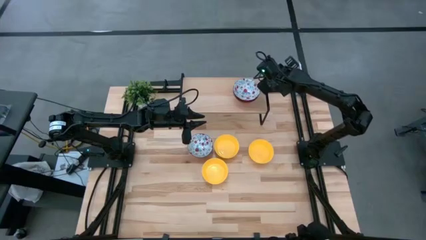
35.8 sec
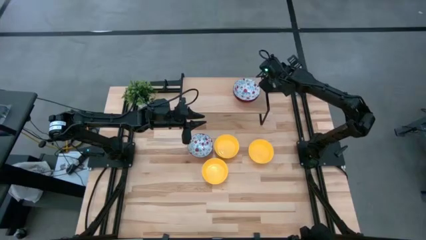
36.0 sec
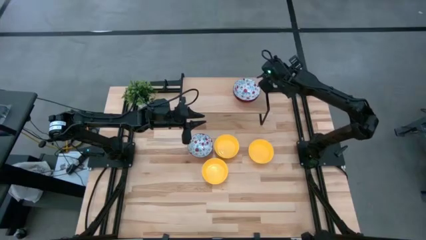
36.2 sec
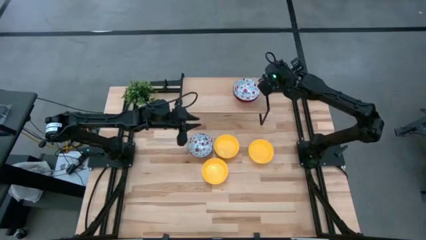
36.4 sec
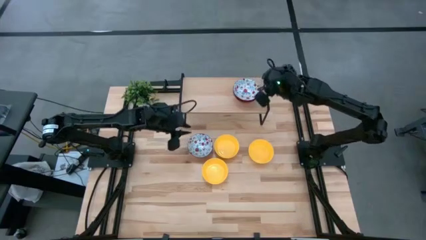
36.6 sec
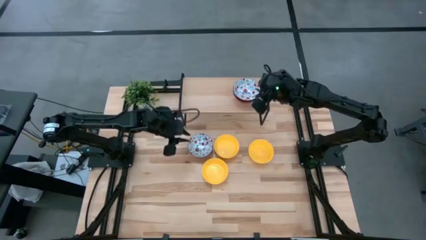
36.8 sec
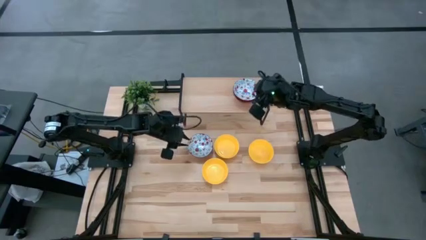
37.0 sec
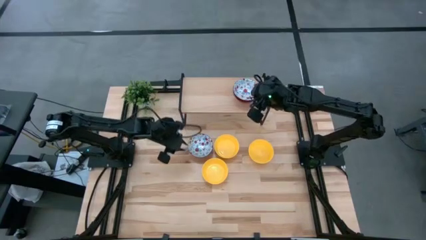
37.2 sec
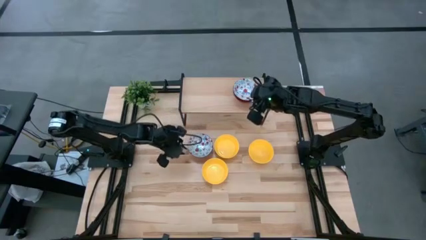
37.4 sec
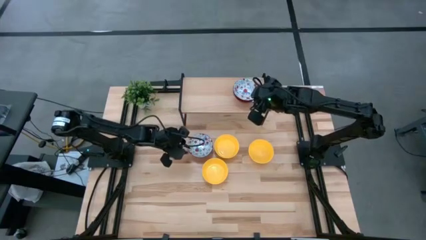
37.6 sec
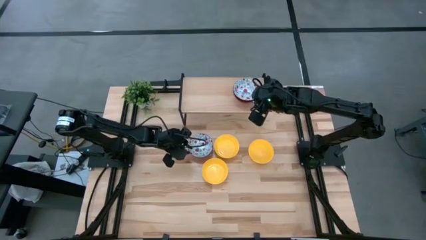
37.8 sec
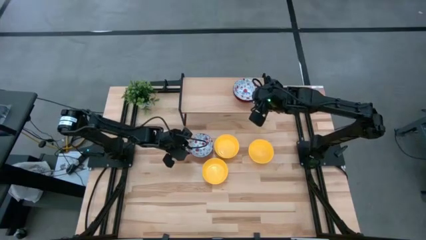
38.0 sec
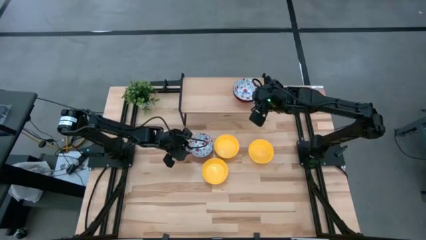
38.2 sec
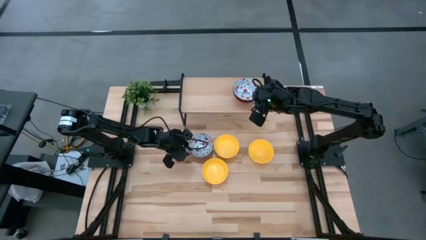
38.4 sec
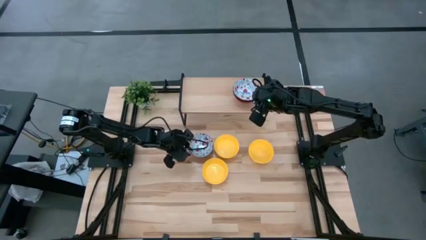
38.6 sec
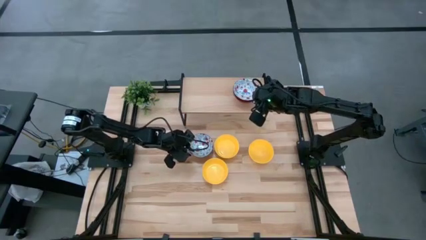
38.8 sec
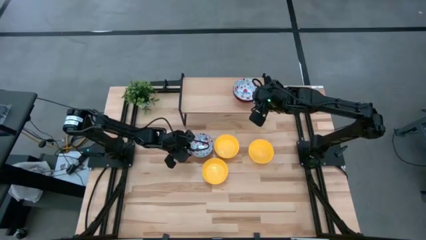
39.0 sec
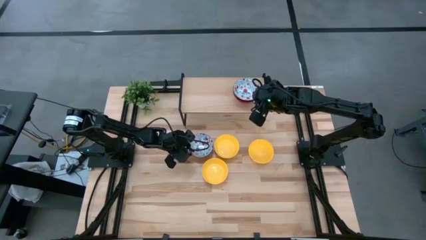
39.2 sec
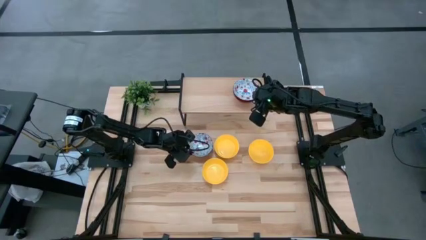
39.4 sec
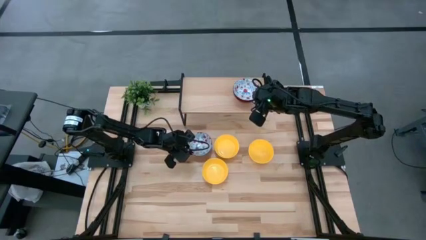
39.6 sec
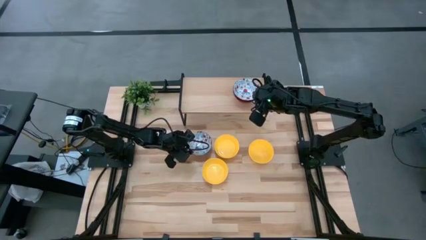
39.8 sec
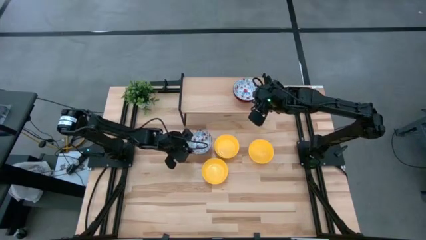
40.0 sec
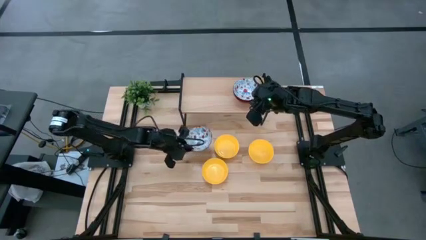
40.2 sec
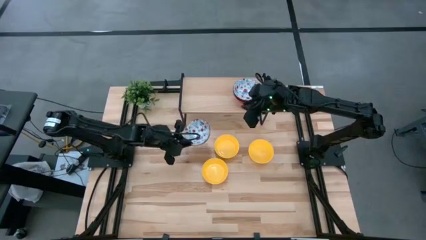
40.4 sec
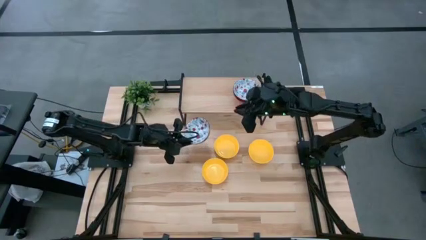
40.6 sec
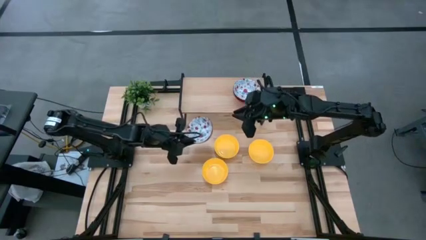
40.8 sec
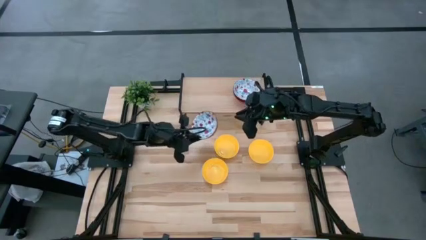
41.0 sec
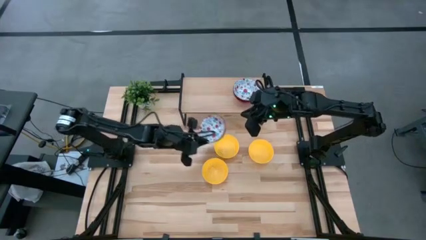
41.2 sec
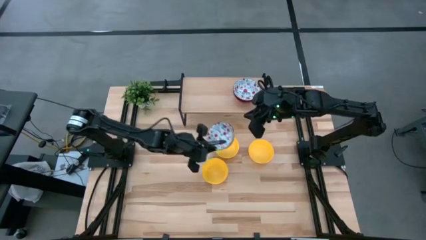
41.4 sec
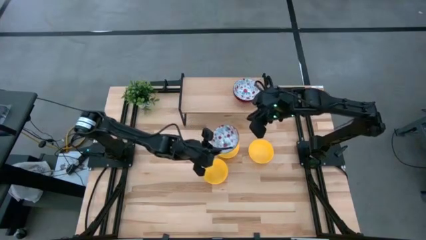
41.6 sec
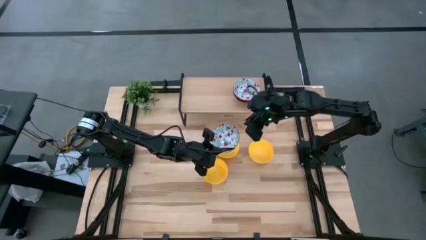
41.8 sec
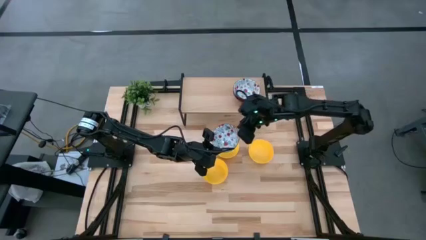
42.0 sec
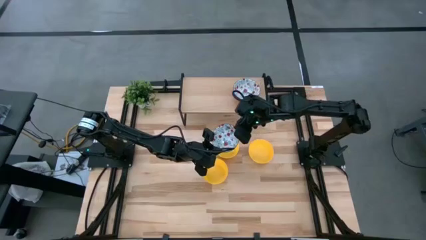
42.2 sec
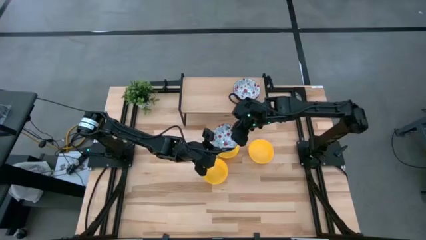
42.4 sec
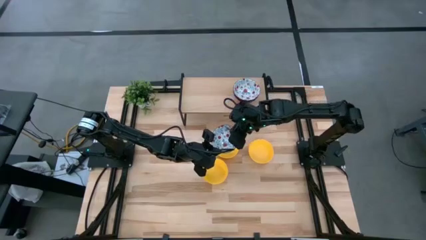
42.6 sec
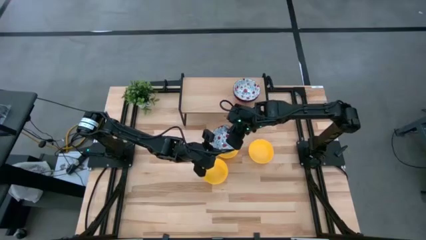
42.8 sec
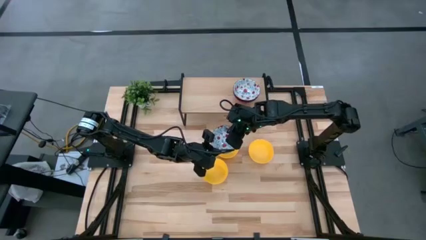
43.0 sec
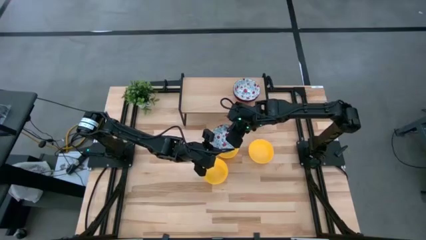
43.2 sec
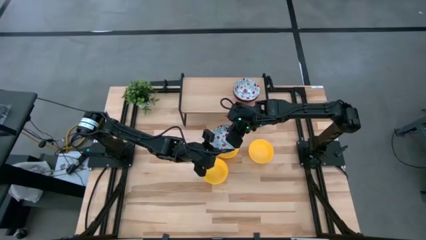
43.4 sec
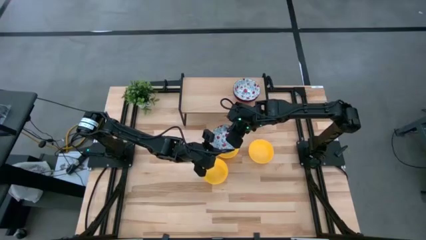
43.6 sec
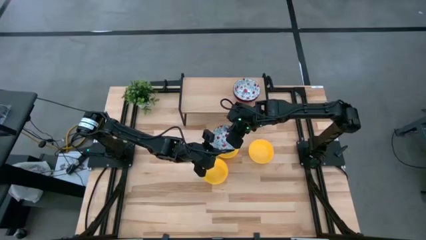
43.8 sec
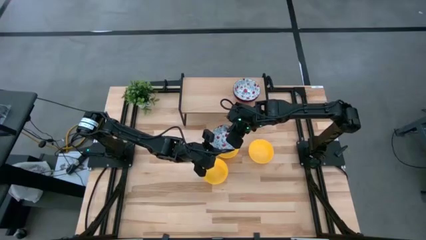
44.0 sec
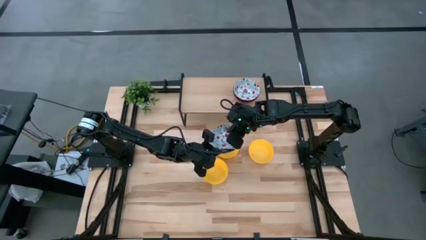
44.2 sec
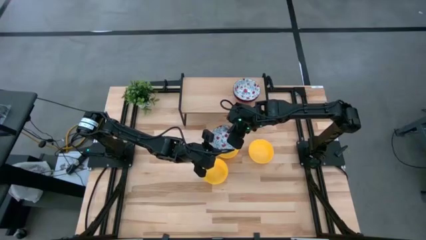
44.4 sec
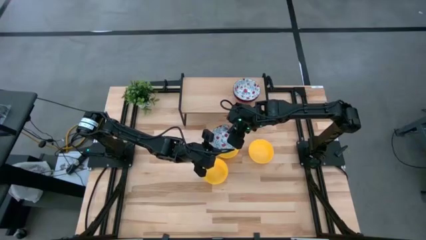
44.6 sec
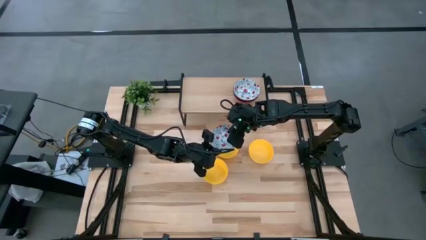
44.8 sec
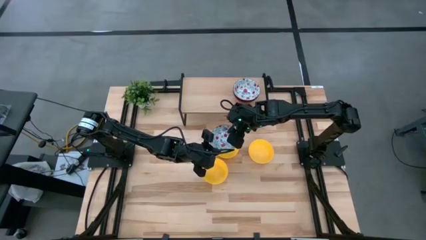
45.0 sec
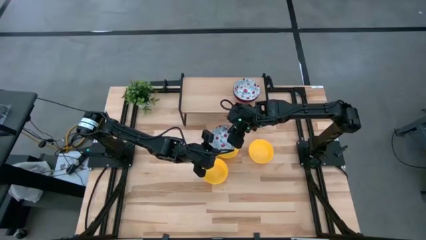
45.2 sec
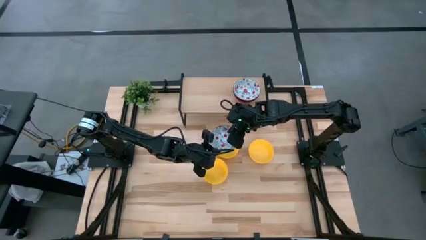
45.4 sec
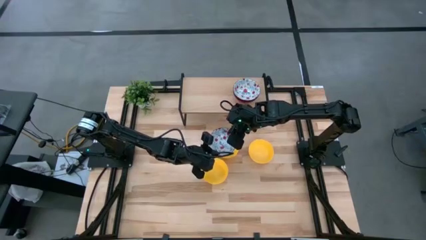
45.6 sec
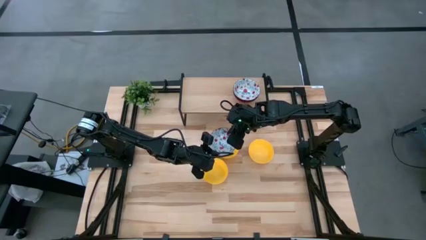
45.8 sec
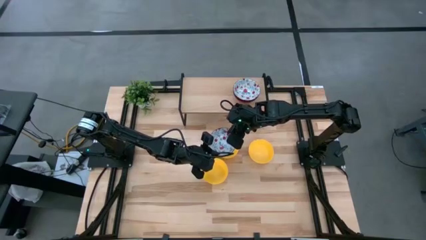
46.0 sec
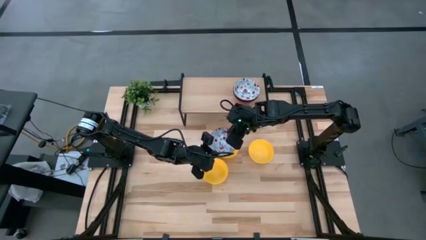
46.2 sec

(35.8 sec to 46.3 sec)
Task: Pick & Place Mini bowls
Stack the white patterned bowl on top of the stacked white patterned bowls on the shelf
